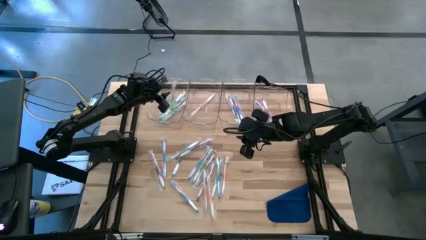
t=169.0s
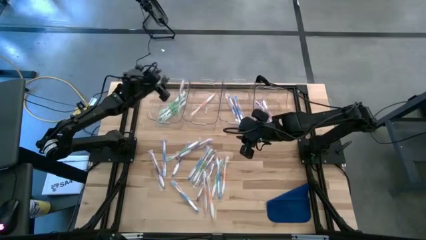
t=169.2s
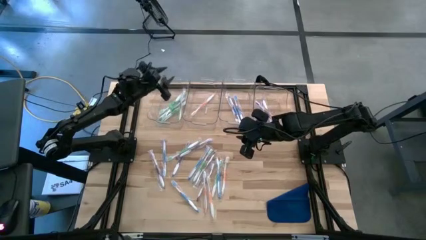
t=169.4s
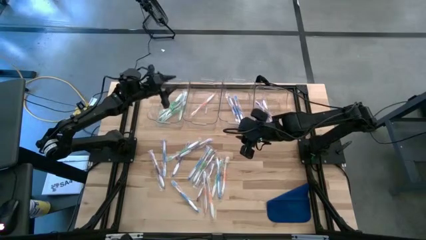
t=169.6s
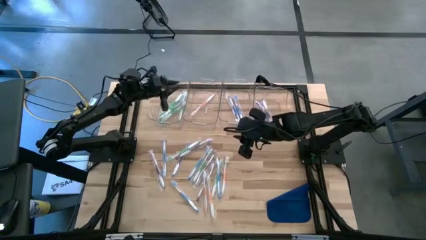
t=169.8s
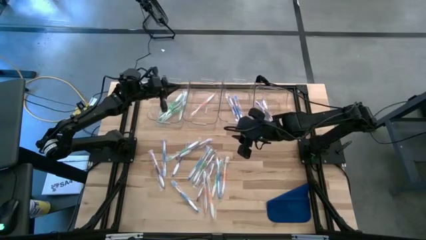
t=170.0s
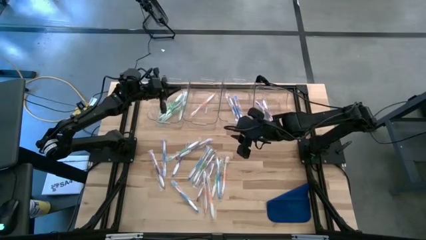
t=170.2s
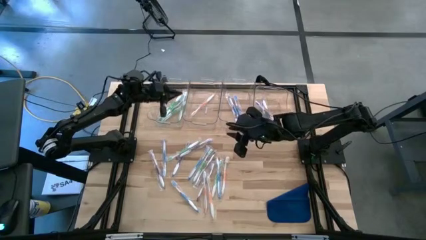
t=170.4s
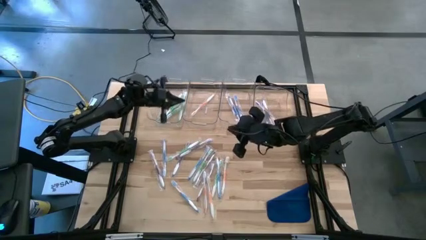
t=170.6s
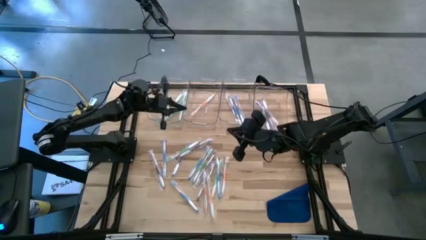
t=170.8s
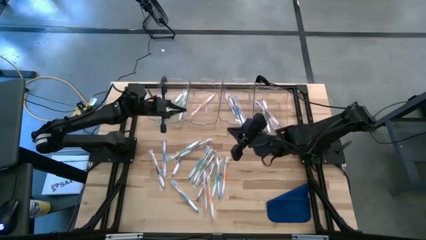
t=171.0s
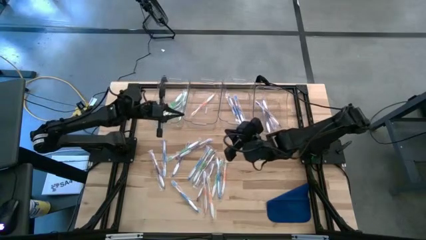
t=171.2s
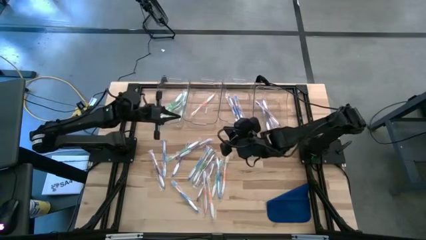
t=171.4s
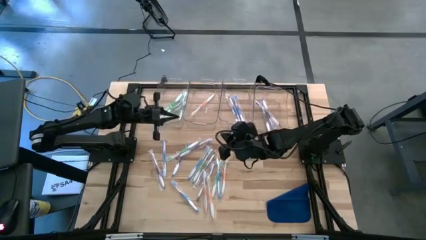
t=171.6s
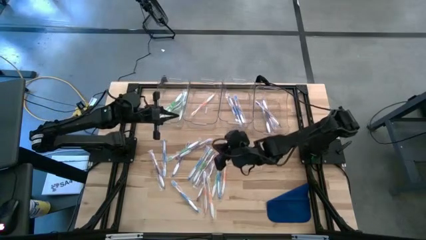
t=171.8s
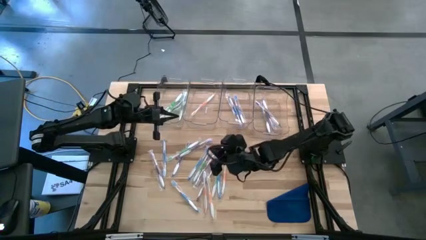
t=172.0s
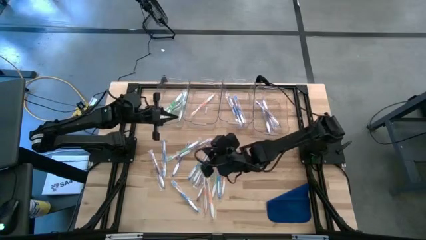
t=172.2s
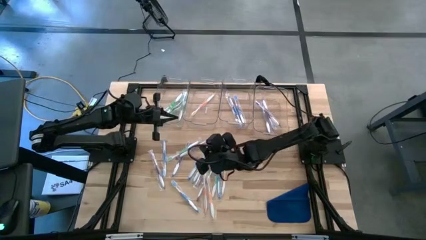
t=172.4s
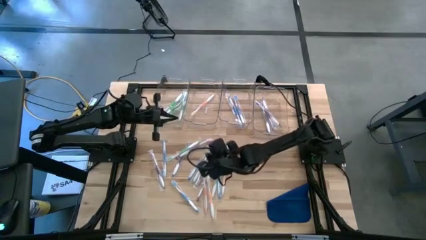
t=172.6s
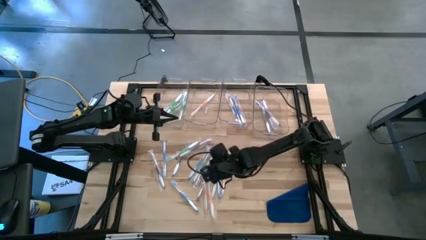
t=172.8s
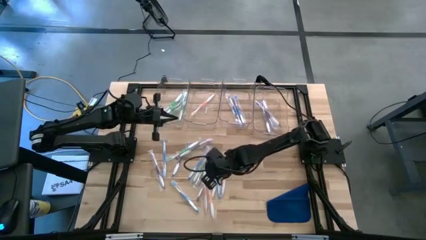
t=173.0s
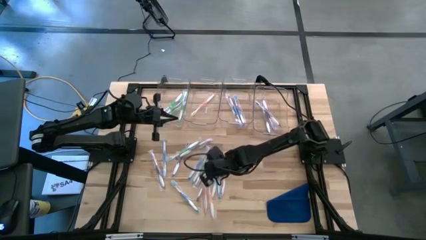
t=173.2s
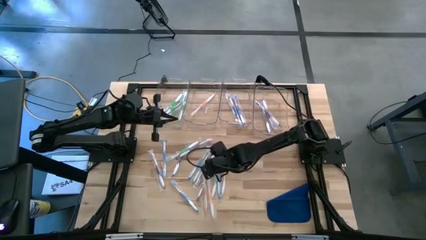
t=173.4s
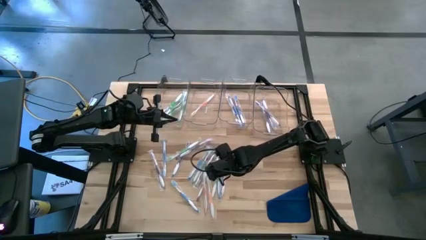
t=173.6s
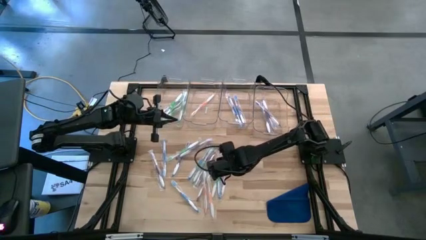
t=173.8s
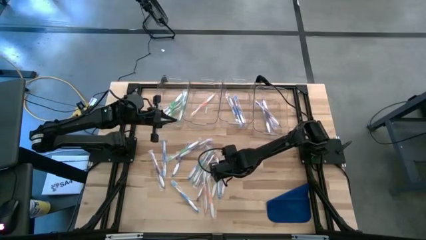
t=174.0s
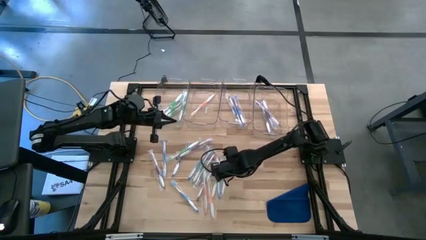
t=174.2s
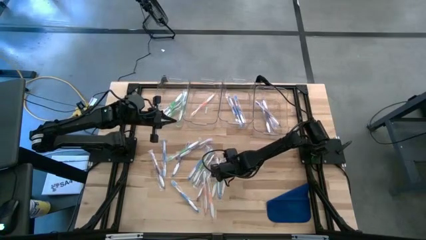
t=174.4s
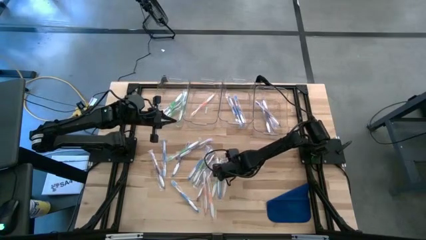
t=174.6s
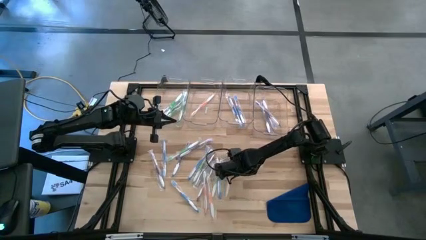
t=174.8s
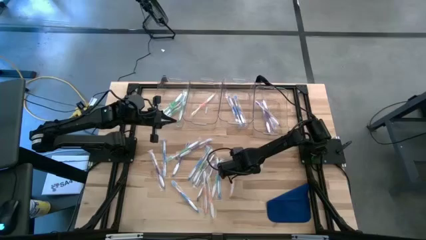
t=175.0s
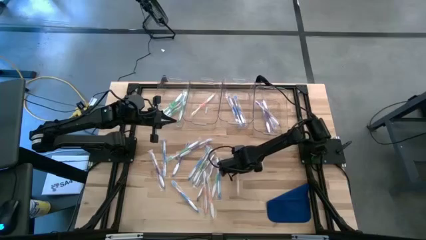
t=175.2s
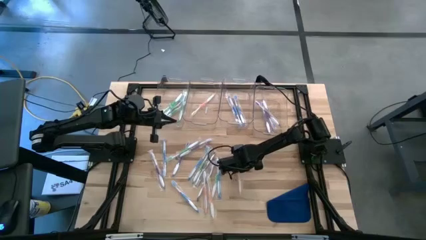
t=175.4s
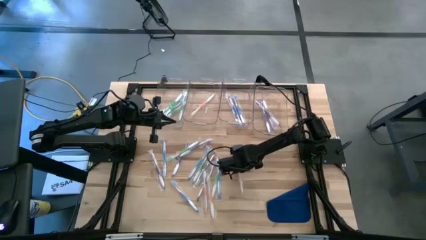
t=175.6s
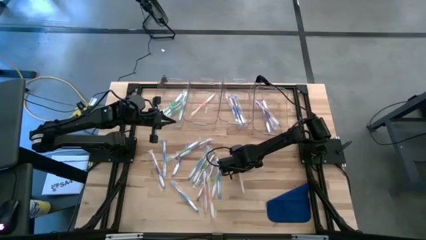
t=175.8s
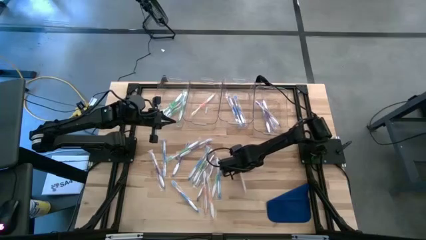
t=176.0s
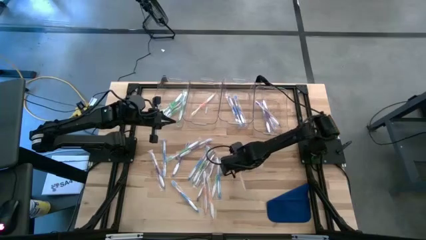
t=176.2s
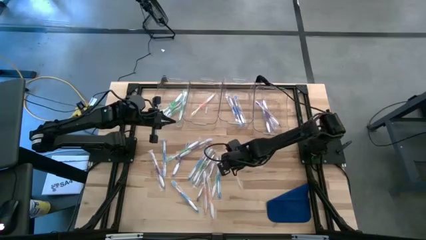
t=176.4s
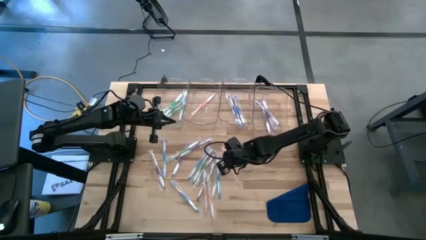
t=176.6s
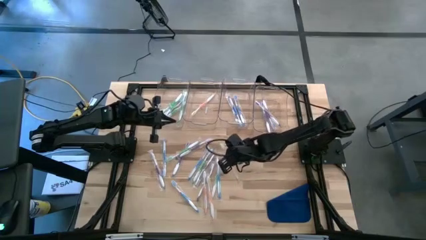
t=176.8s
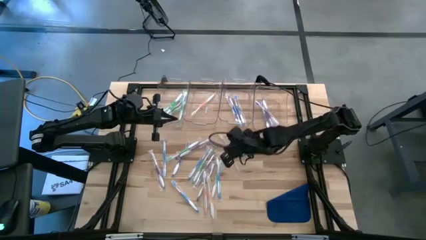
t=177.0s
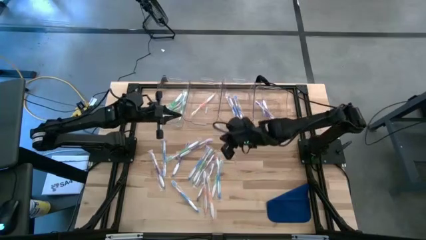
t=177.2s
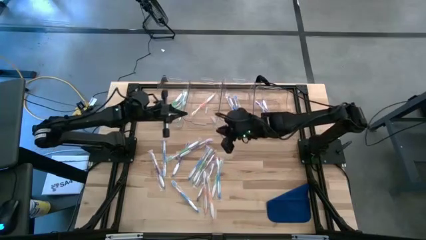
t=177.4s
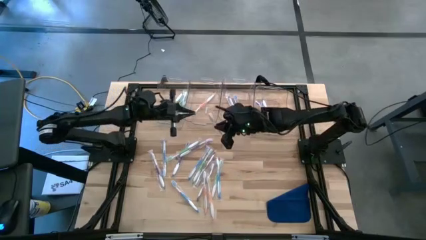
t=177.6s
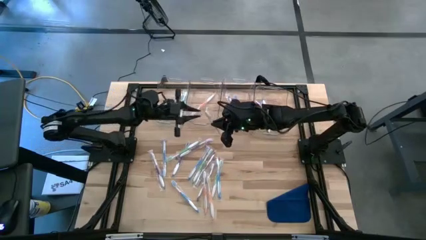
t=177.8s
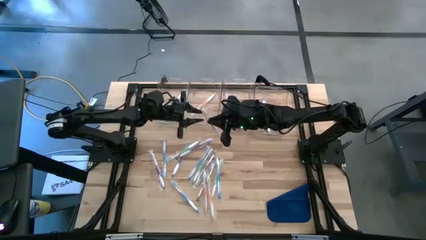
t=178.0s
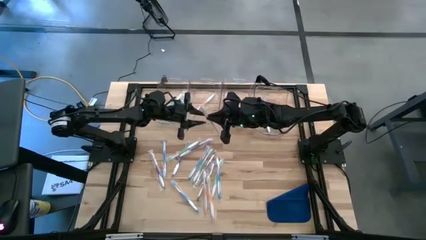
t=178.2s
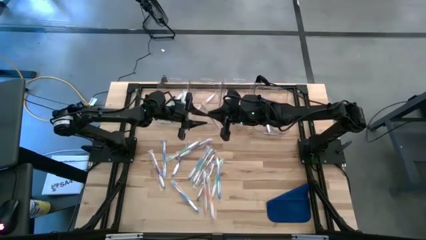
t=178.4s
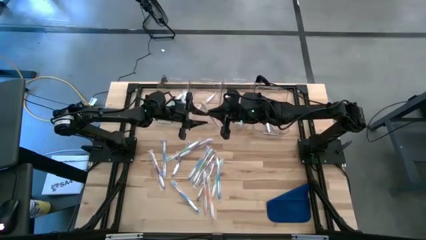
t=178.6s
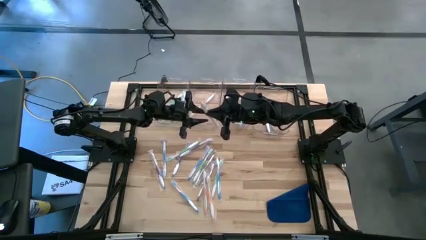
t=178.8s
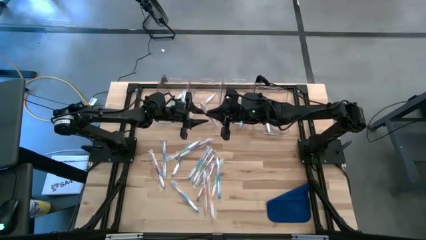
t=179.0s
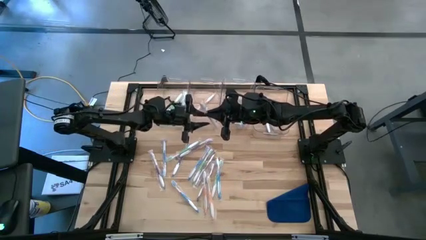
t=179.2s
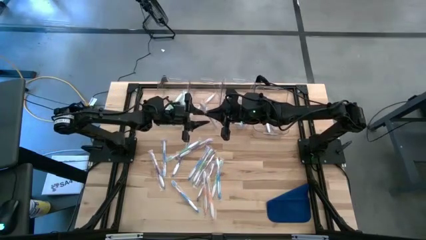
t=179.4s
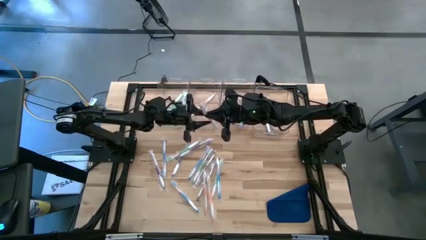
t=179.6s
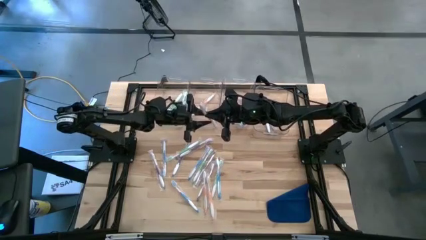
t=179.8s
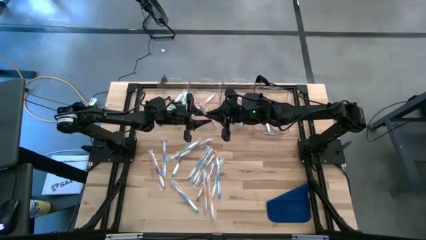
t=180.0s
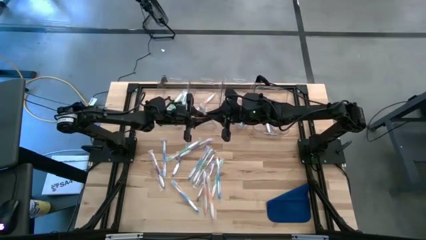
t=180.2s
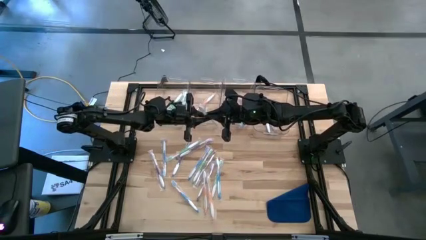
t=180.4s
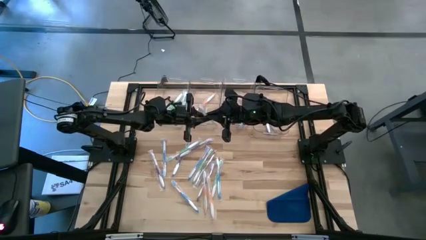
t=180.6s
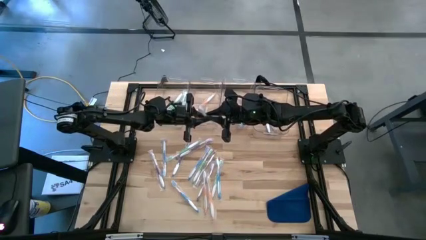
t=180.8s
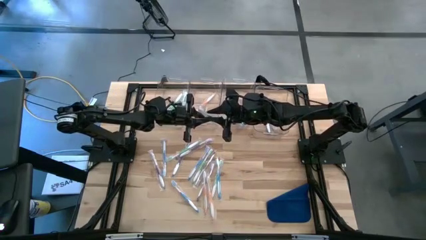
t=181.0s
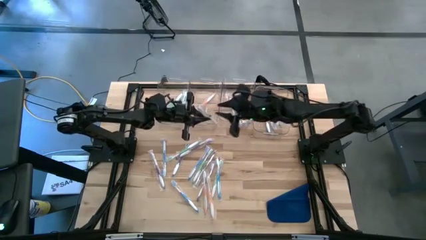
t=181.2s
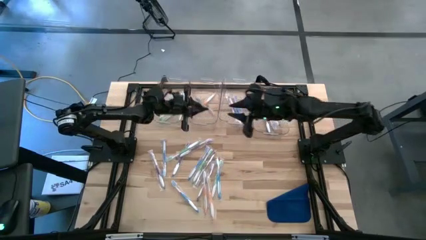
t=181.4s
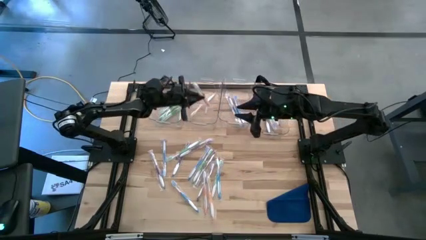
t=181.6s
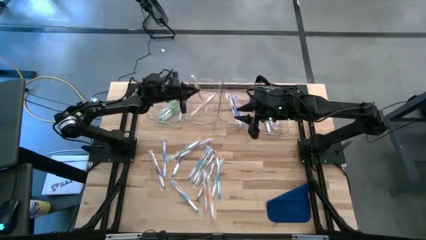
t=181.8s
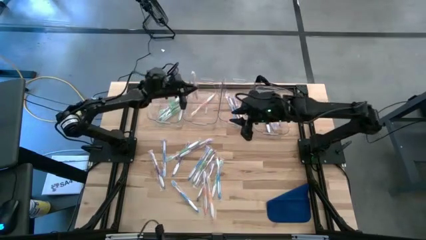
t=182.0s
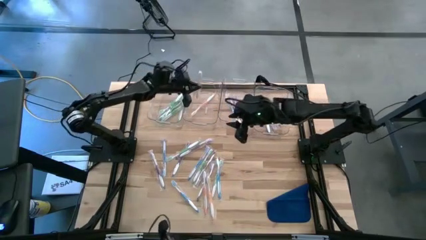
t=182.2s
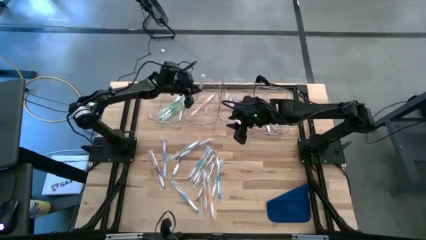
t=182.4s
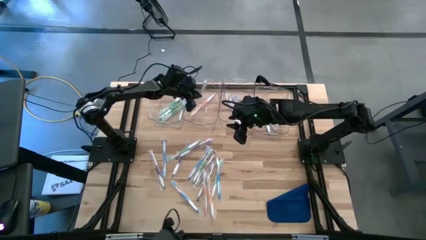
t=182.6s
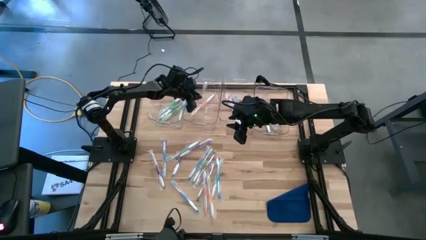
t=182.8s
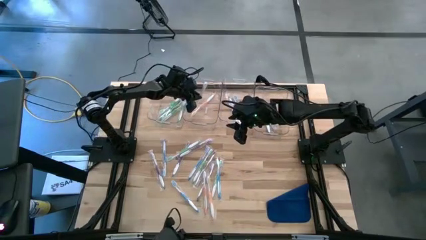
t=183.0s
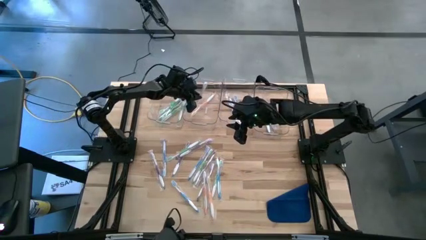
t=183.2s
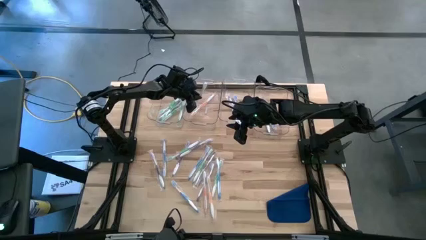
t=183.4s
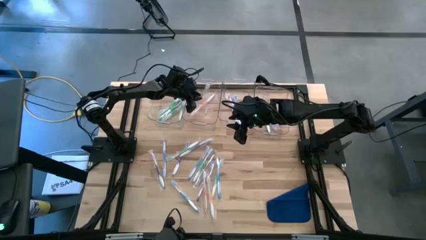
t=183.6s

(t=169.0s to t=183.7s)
Task: Pick & Place Toothbrushes
Put the orange toothbrush into the middle left transparent bin

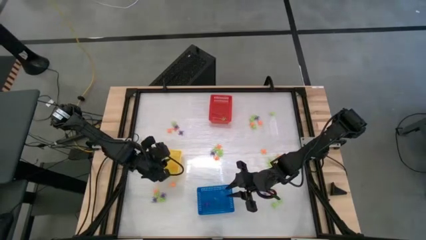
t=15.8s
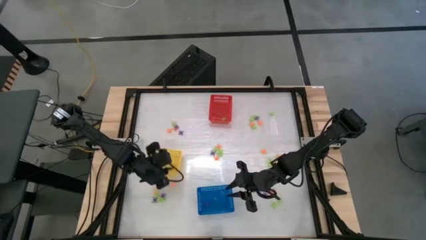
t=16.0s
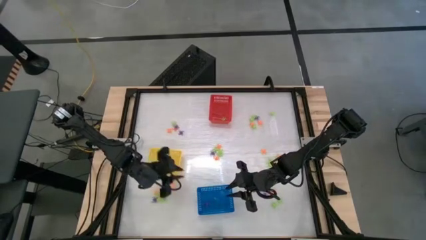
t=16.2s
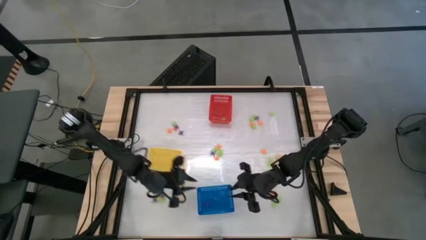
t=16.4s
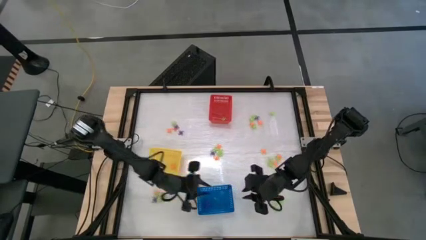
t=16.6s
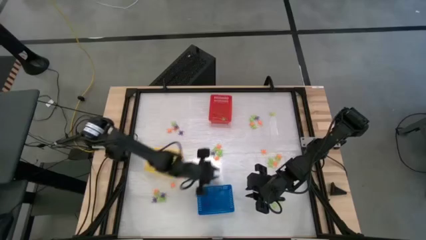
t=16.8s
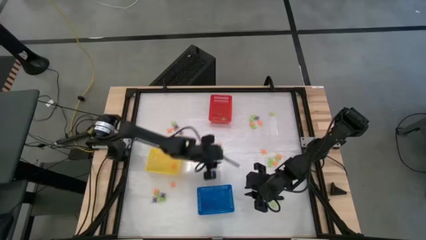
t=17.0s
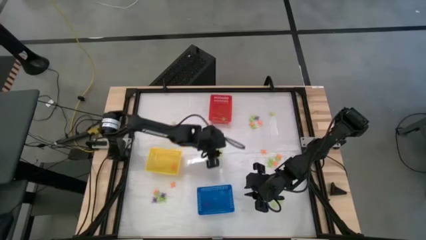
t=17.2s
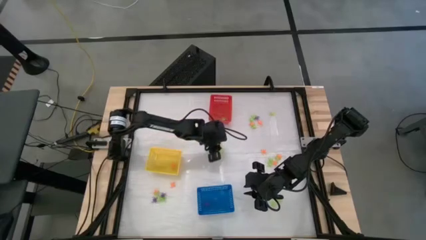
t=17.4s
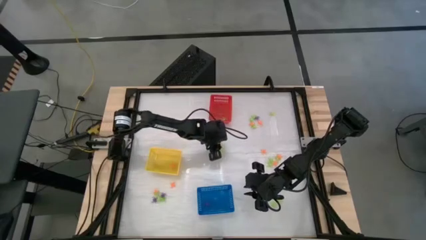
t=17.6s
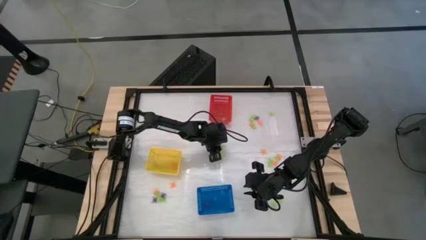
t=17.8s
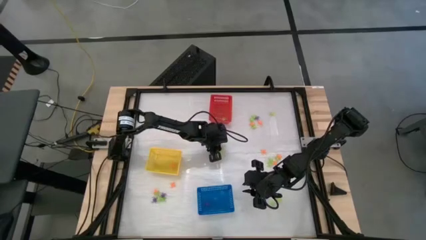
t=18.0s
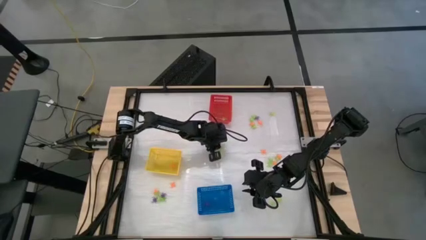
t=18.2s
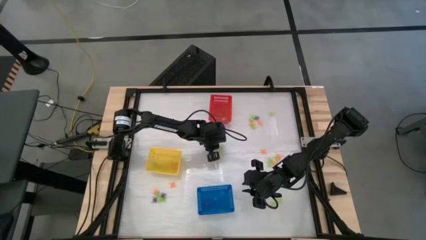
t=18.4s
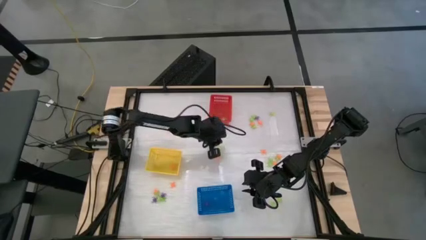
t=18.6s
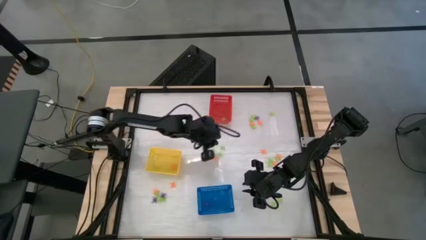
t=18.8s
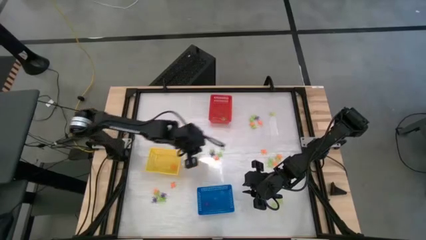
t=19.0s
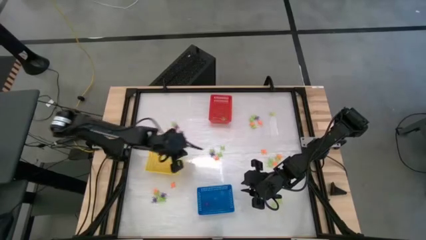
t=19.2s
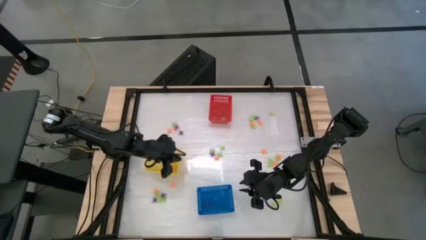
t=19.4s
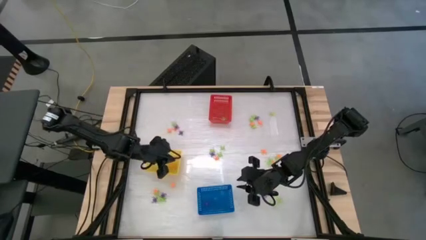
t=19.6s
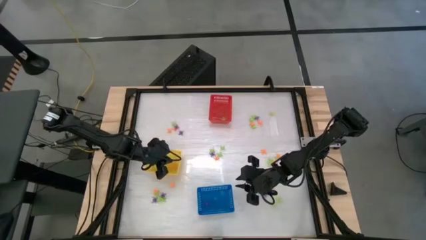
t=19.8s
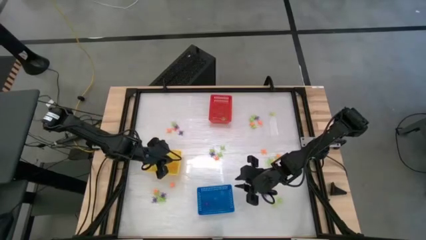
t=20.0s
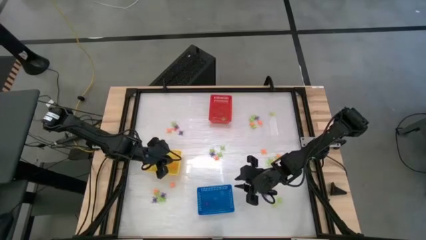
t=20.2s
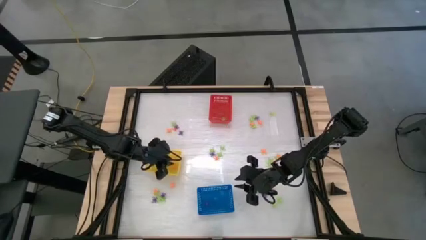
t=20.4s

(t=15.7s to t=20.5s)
Task: Sort Halloween decoration
Put the orange spider toy into the yellow basket
